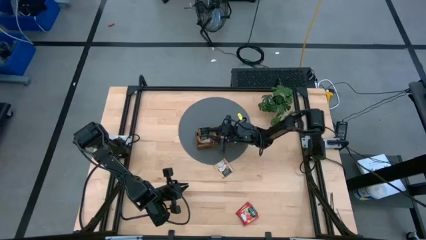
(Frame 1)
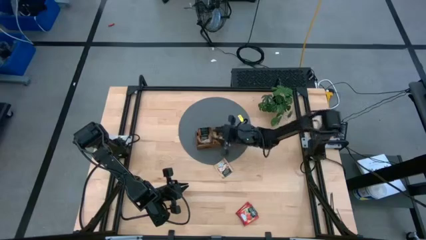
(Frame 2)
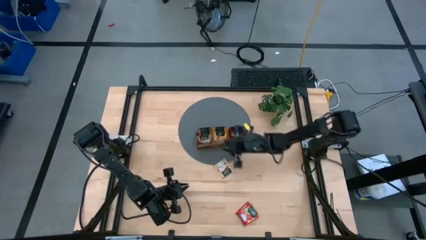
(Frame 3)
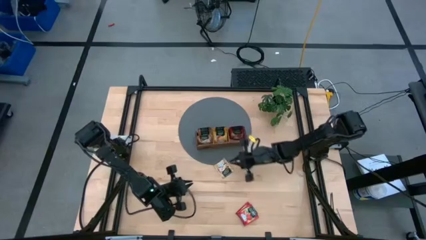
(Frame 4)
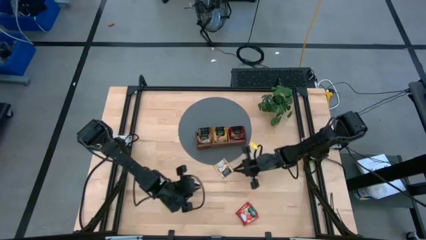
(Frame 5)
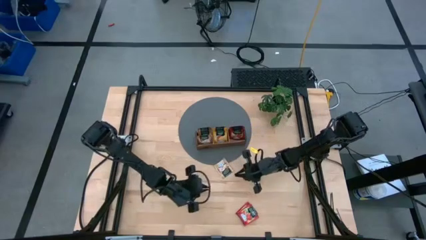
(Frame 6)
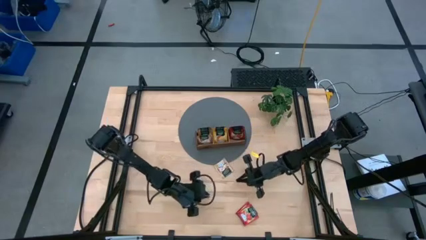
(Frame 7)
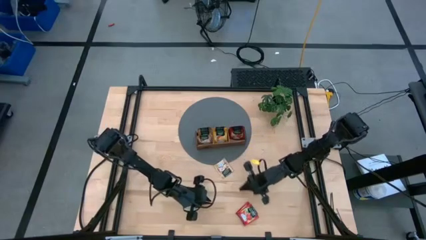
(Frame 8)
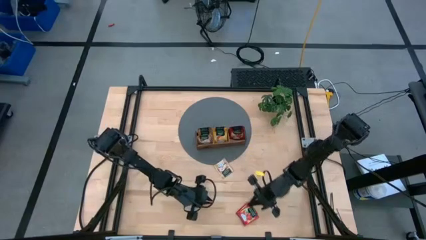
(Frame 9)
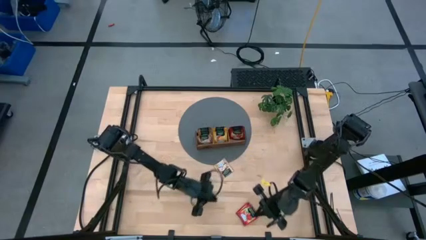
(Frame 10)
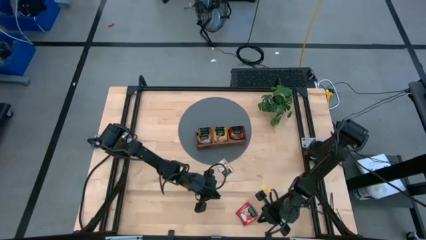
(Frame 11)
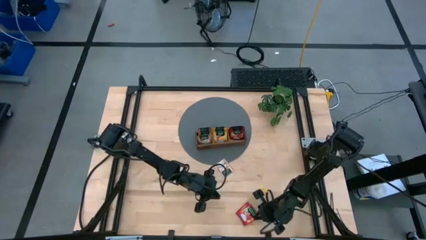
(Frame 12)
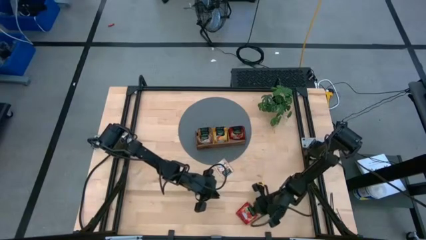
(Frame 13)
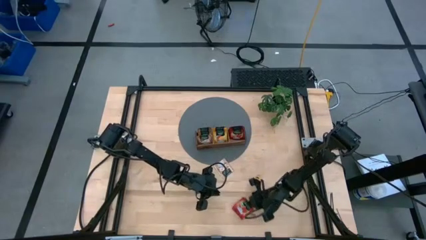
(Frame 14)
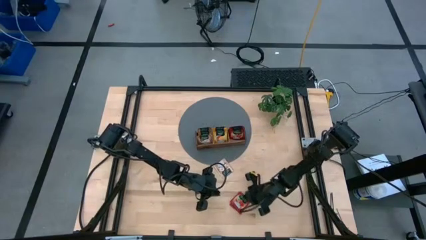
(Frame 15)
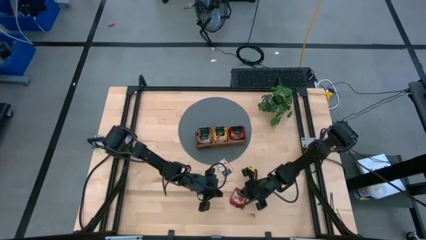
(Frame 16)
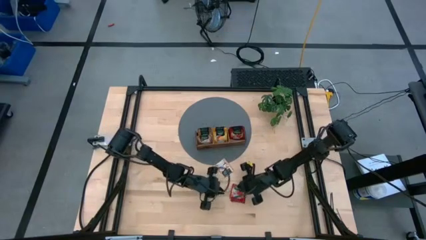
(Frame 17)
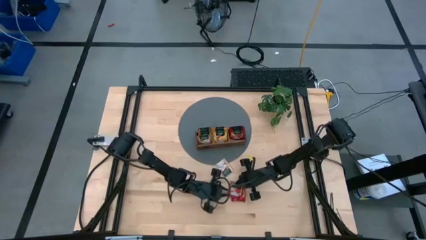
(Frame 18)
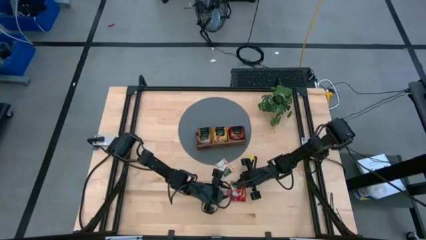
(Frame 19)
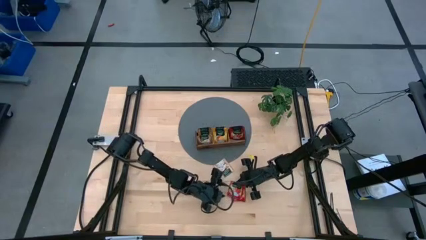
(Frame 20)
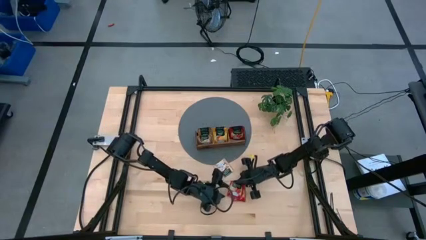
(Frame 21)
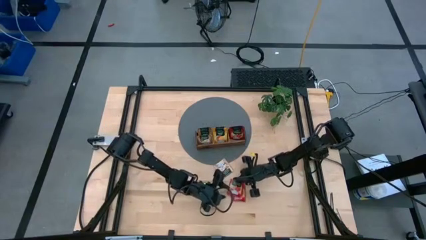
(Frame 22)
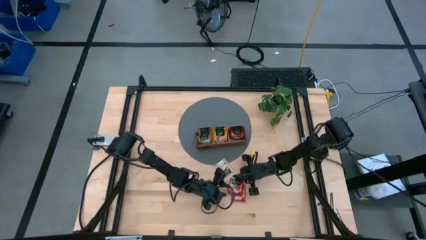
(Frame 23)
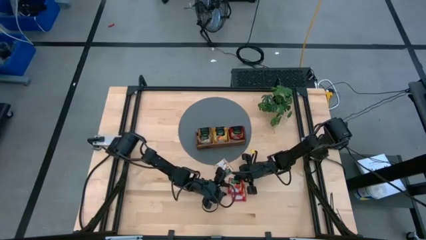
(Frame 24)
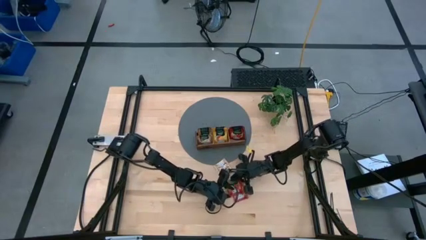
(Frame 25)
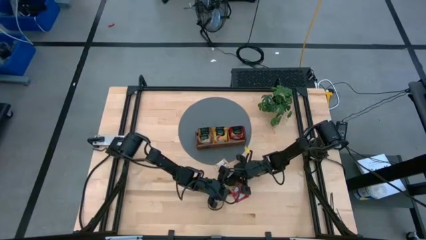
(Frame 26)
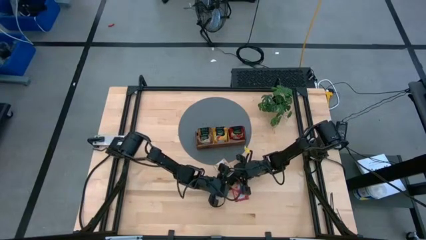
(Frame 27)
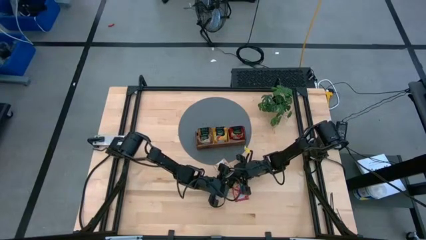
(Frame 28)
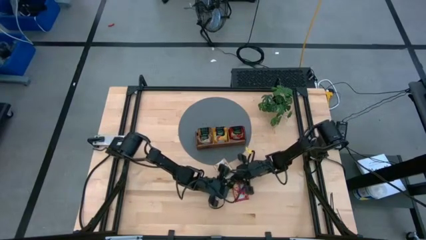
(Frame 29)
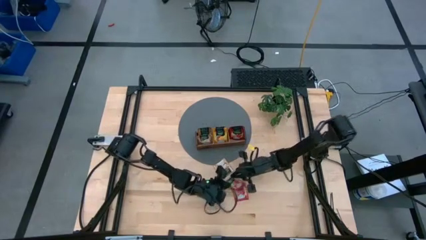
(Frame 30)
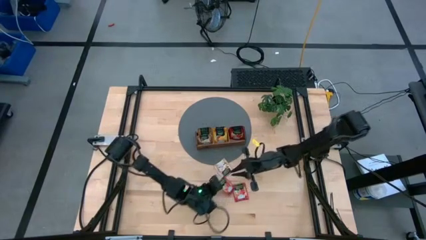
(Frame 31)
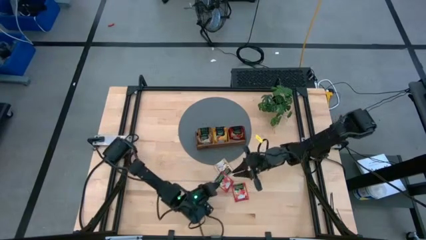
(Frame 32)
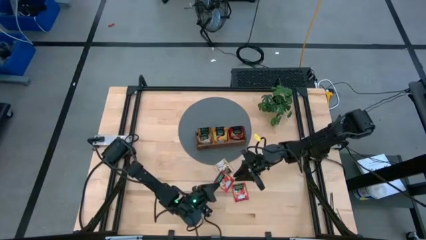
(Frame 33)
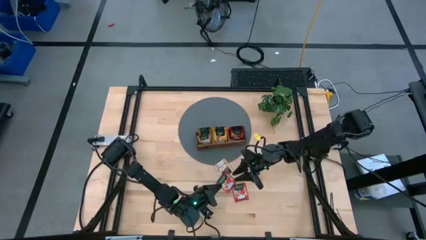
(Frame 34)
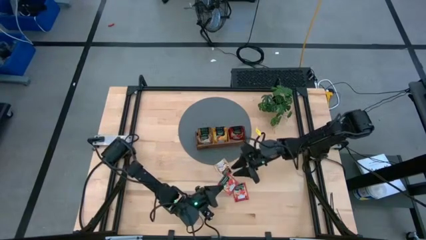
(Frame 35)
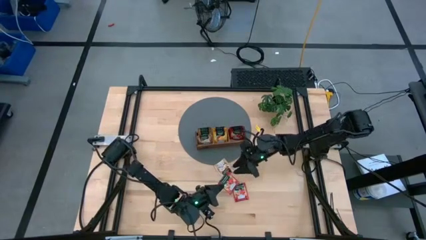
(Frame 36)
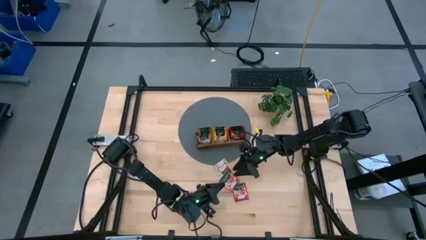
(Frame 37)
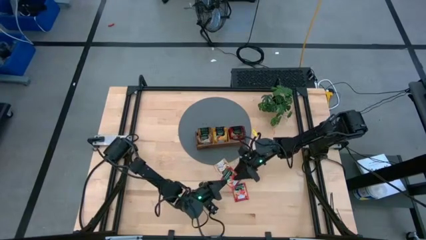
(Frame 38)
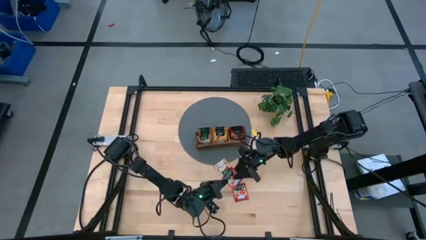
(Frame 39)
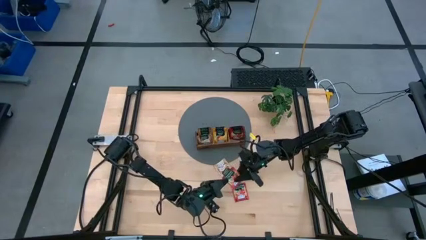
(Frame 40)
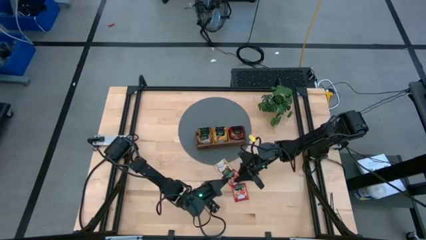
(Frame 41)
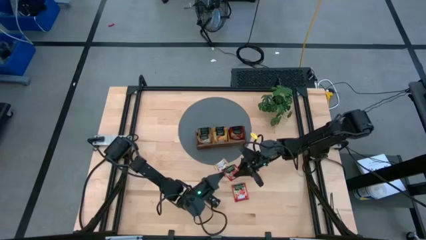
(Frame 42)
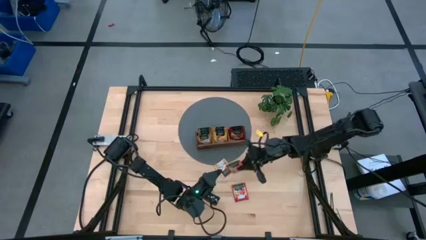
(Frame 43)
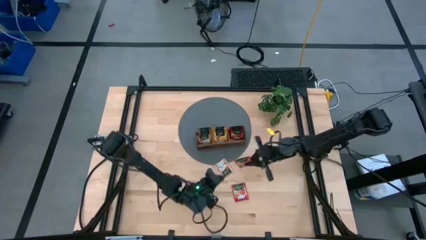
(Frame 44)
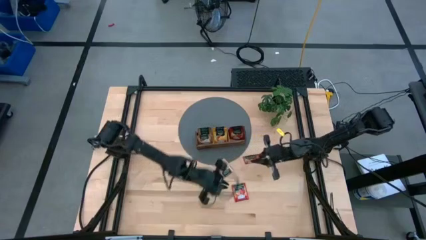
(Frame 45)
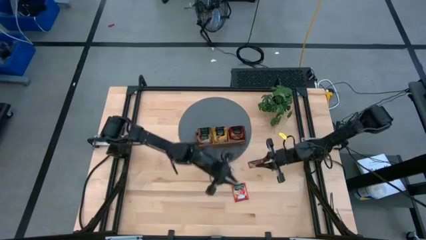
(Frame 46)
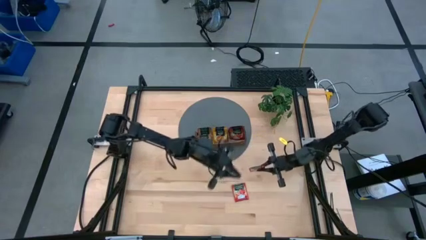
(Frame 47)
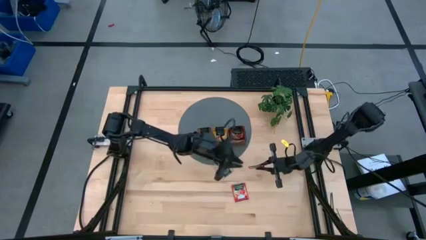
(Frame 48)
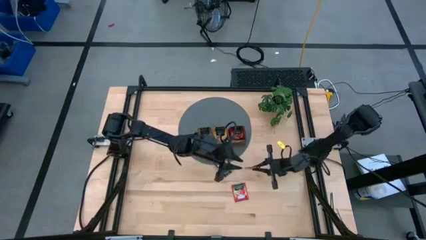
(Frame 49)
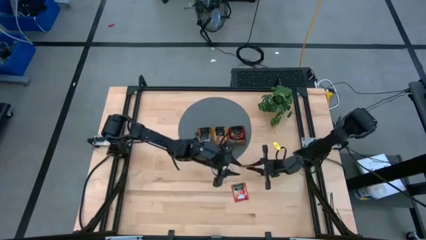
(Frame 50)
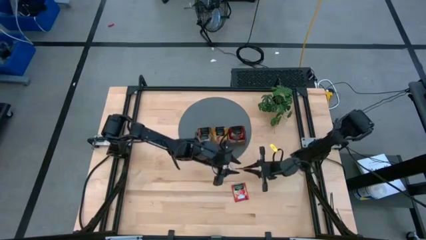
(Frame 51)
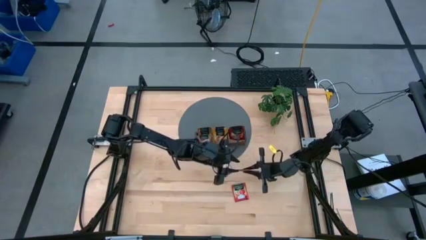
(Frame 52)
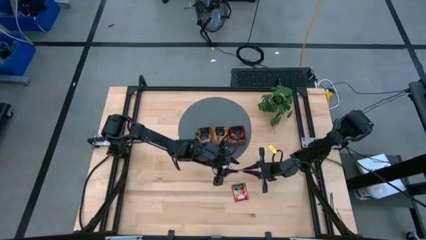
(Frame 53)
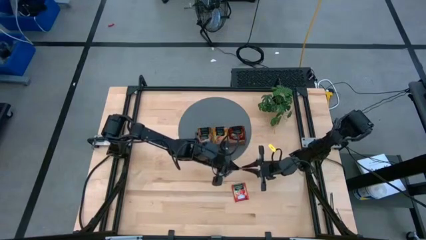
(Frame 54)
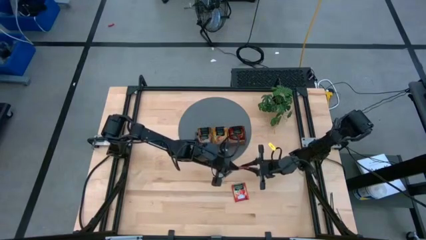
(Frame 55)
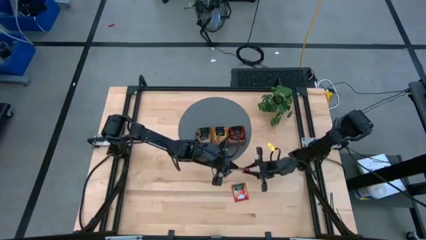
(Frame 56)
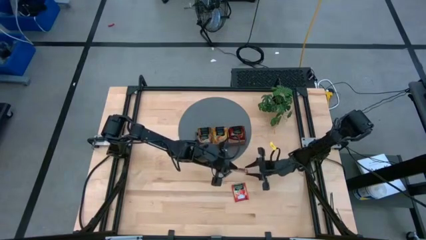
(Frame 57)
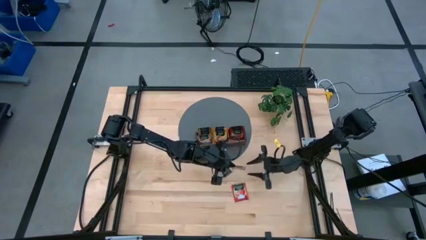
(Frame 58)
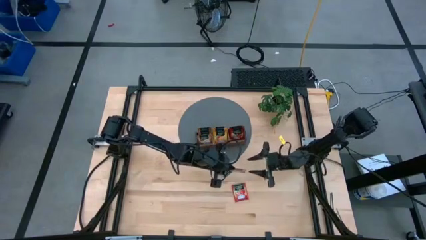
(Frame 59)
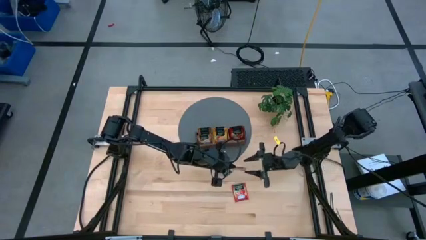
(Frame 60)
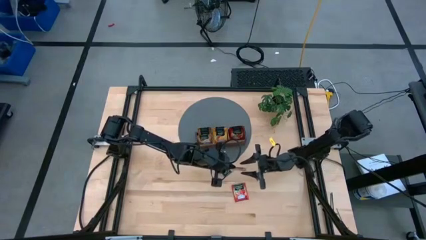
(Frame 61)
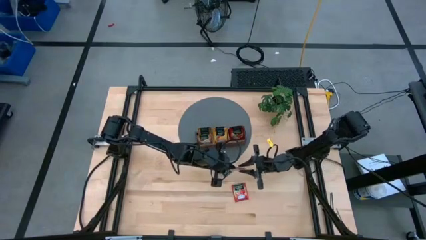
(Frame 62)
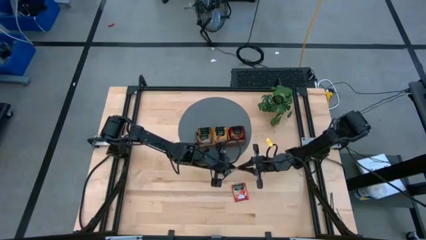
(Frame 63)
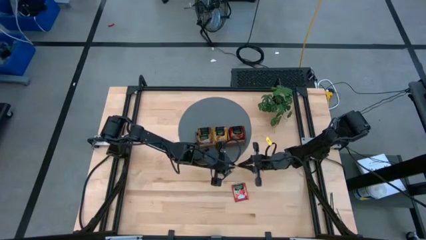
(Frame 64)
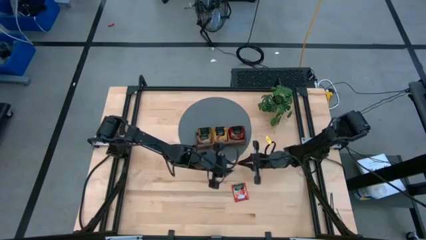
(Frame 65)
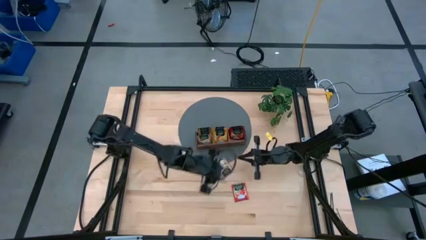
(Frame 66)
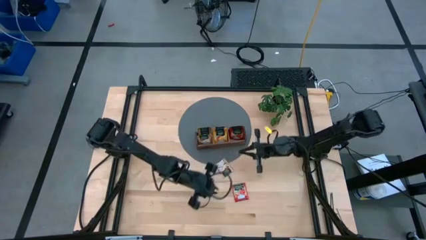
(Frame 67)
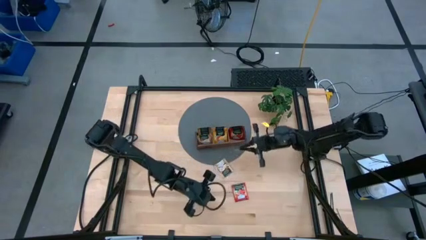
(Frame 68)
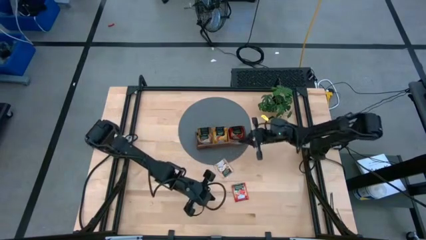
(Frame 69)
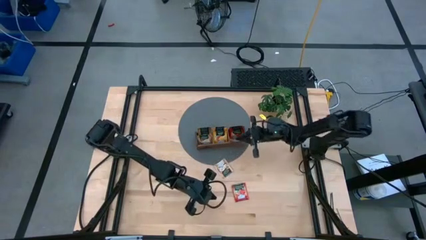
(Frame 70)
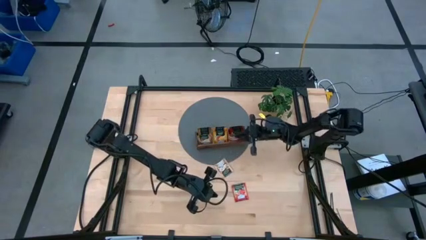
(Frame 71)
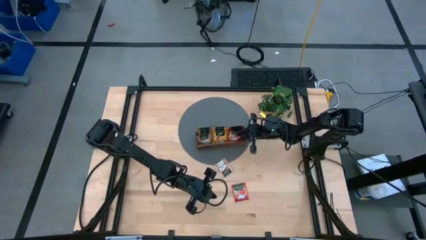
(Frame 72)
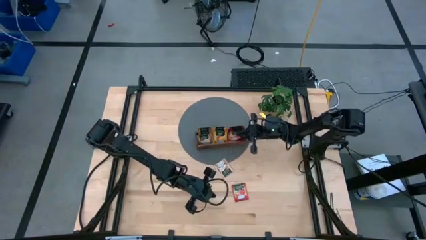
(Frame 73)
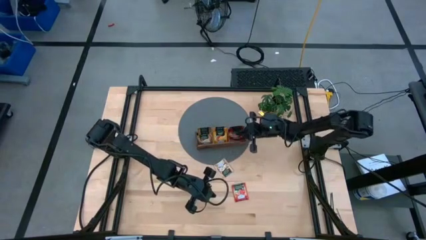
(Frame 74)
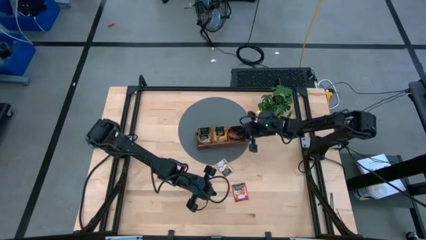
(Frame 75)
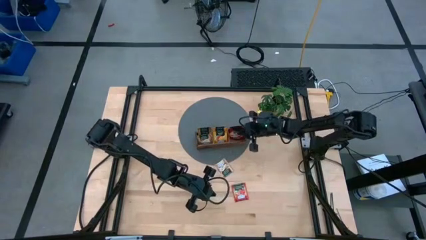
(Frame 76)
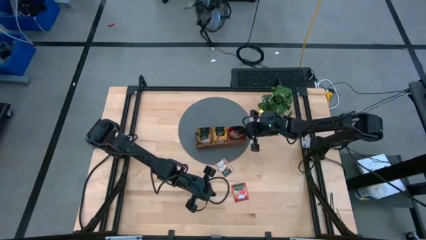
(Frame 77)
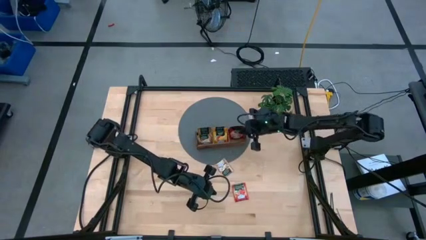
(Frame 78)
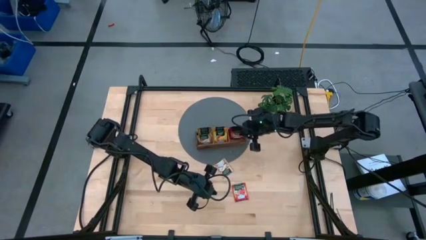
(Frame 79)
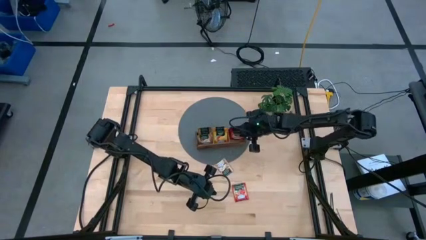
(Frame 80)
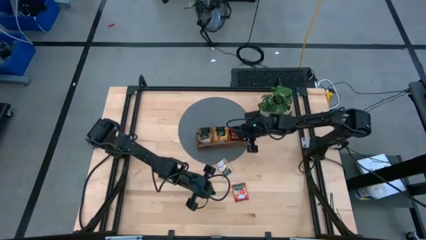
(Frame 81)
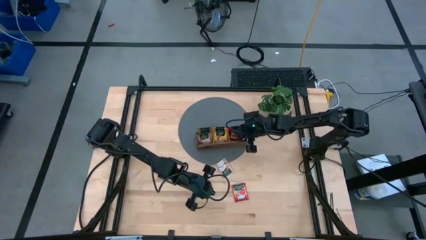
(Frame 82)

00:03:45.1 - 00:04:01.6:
Task: Pick & Place Tea
Put the red tea bag into the right section of the wooden organizer

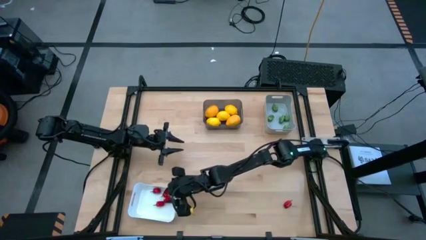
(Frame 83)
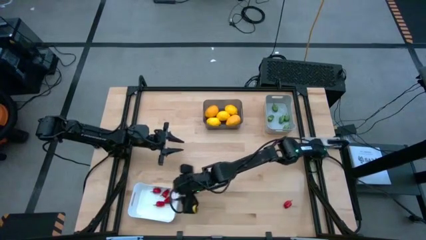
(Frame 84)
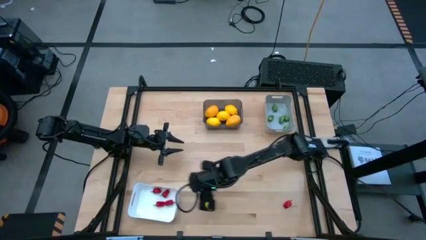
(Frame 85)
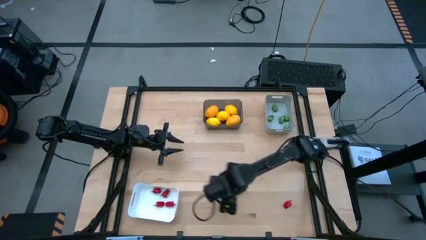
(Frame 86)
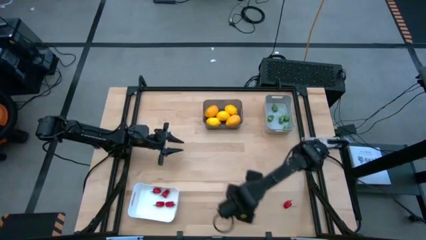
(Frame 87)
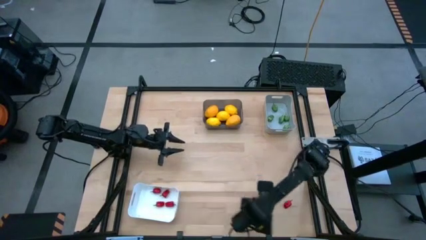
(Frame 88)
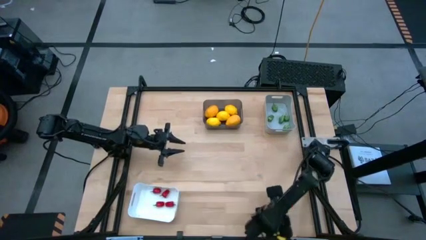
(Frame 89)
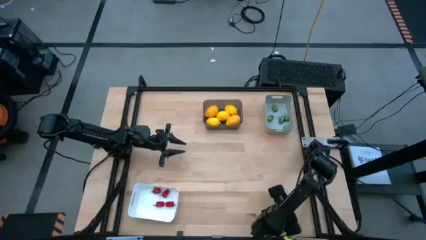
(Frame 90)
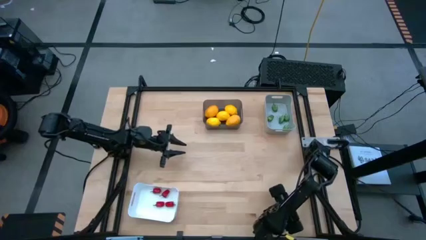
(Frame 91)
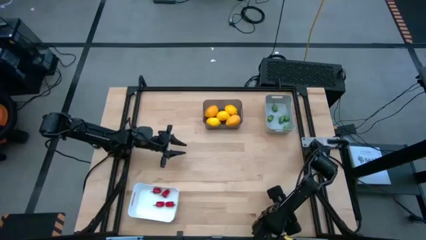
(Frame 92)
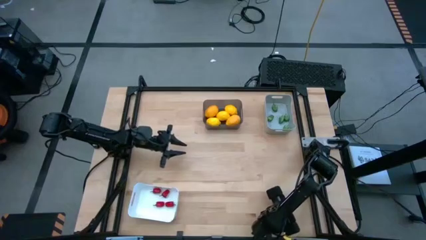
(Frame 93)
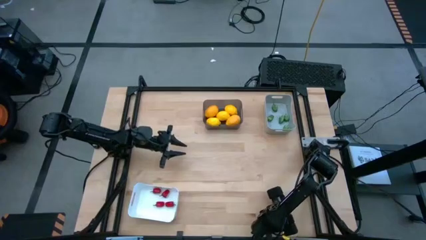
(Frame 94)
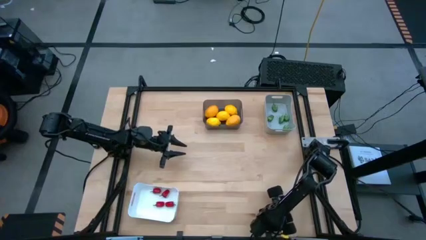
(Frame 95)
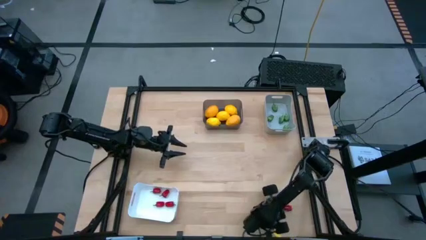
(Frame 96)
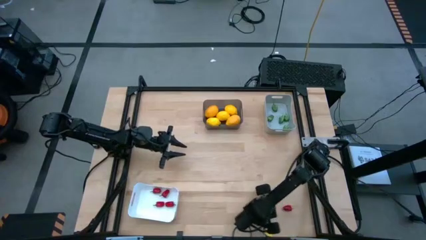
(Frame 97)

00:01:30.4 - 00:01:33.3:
Task: Sort produce into baskets
Put the red pepper into the white bin
